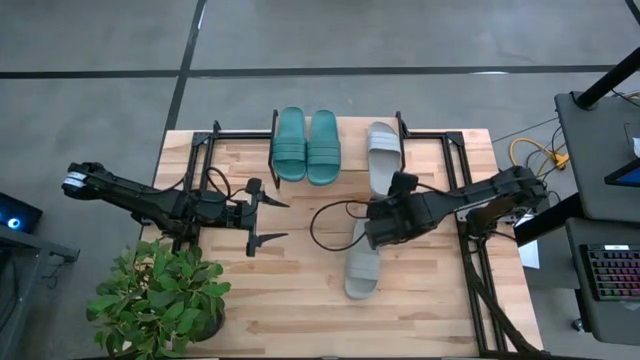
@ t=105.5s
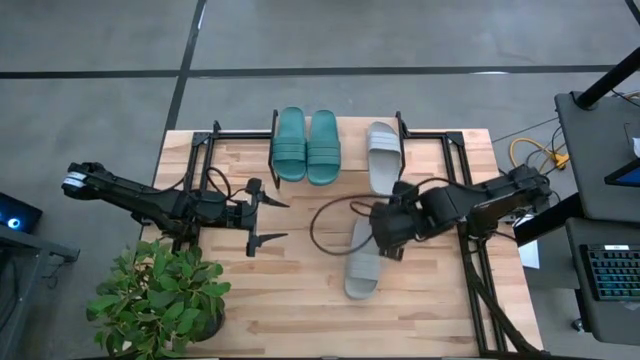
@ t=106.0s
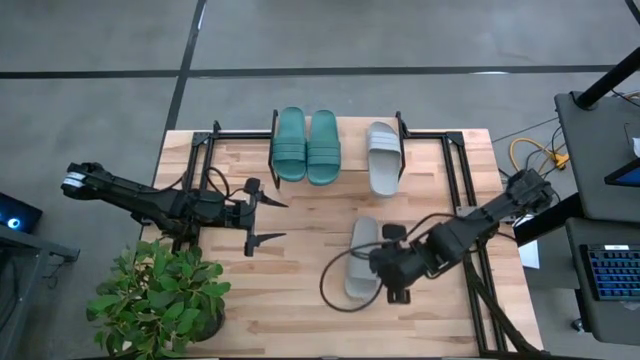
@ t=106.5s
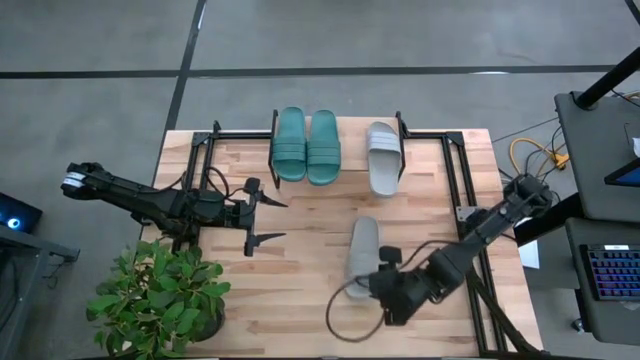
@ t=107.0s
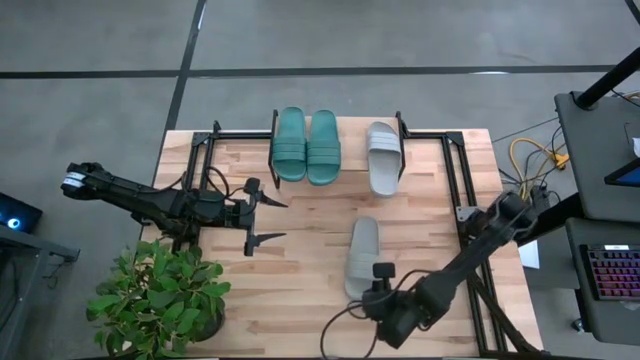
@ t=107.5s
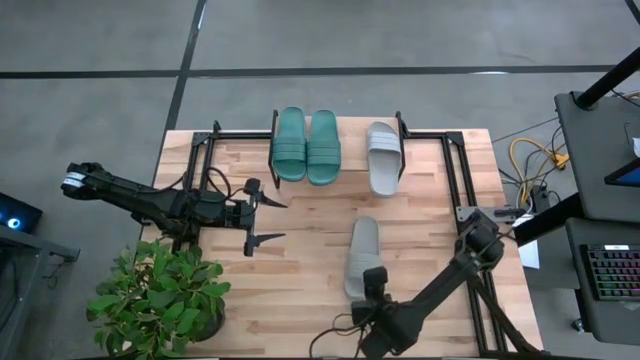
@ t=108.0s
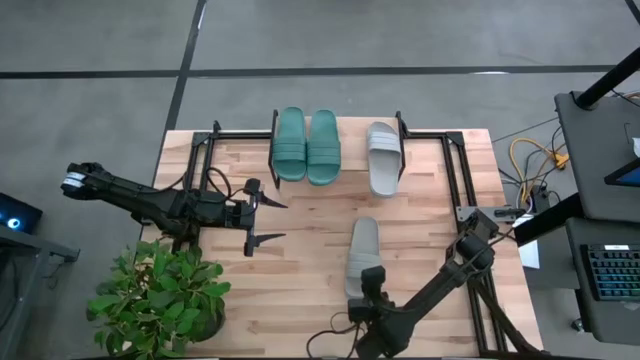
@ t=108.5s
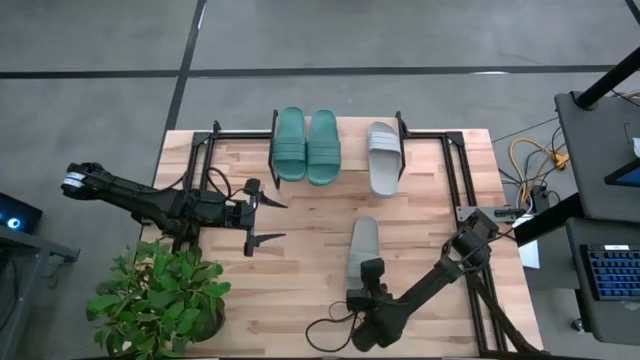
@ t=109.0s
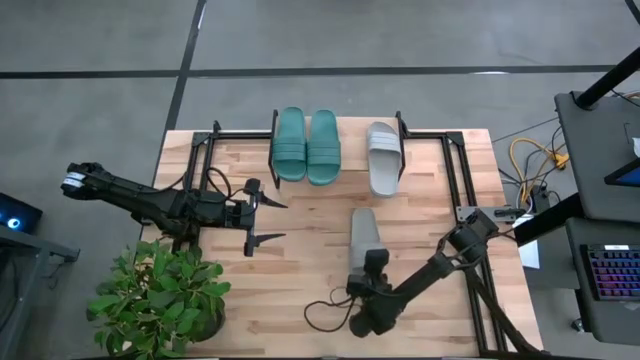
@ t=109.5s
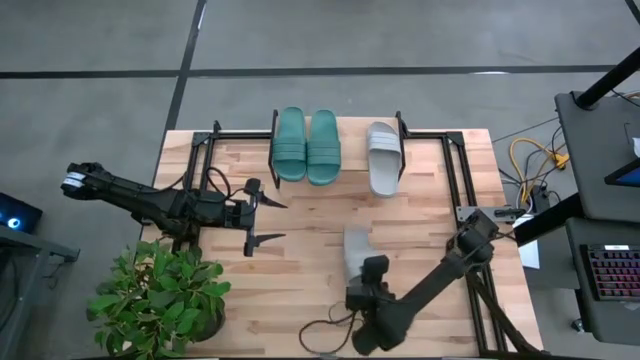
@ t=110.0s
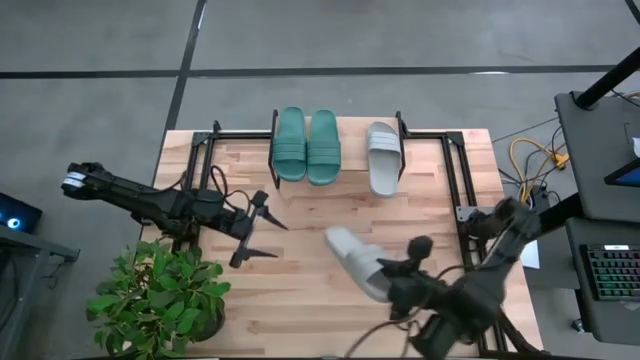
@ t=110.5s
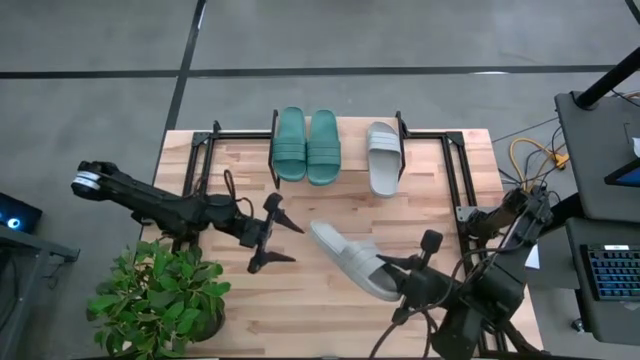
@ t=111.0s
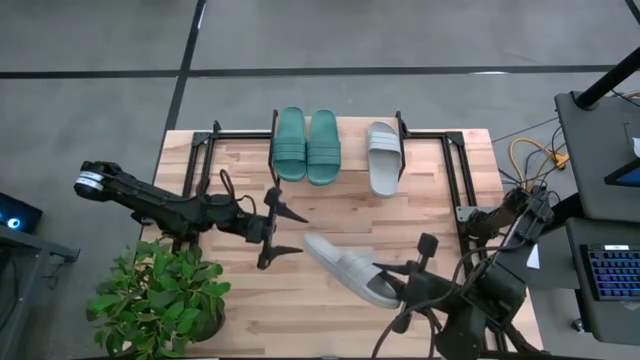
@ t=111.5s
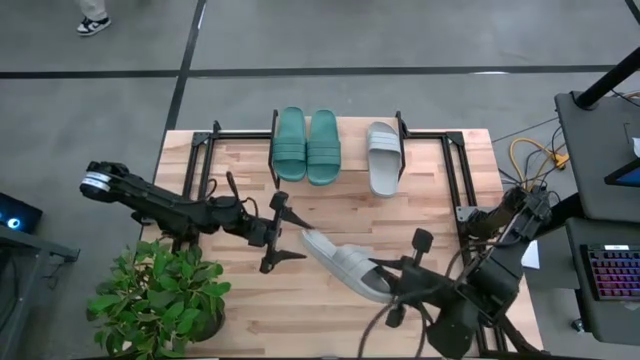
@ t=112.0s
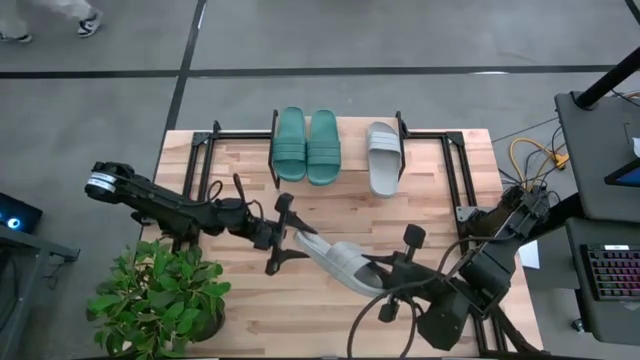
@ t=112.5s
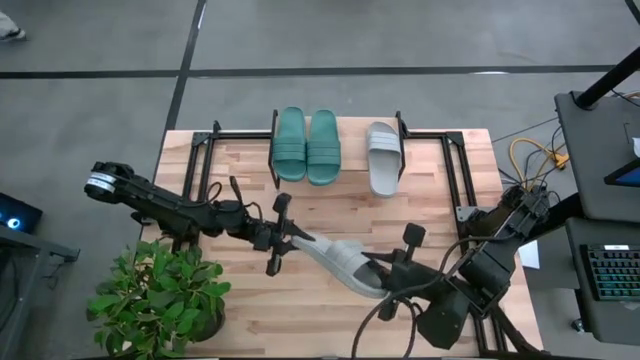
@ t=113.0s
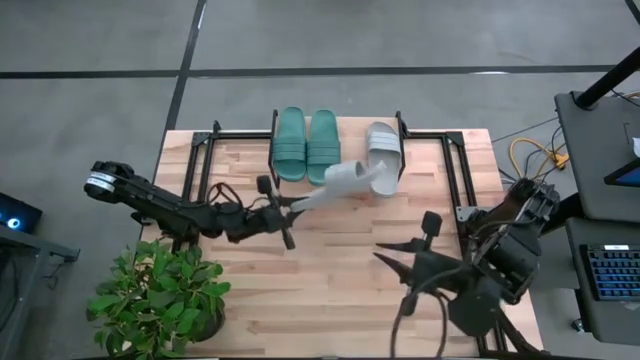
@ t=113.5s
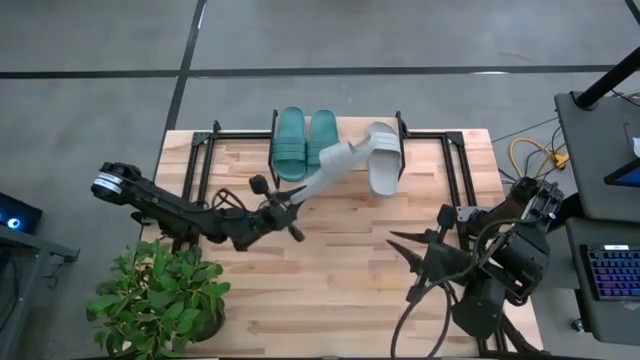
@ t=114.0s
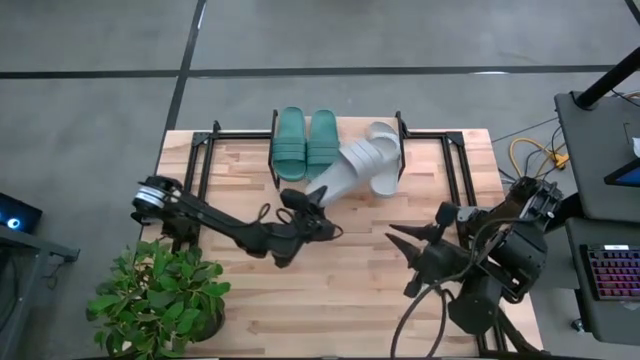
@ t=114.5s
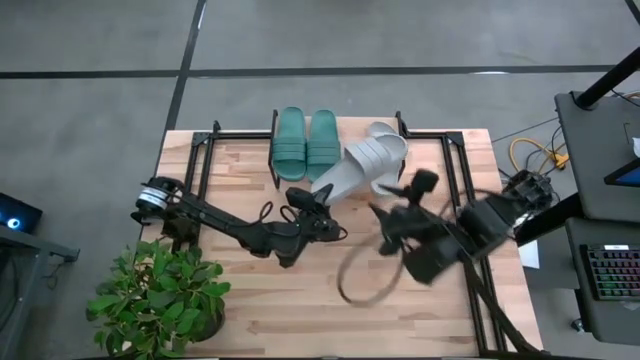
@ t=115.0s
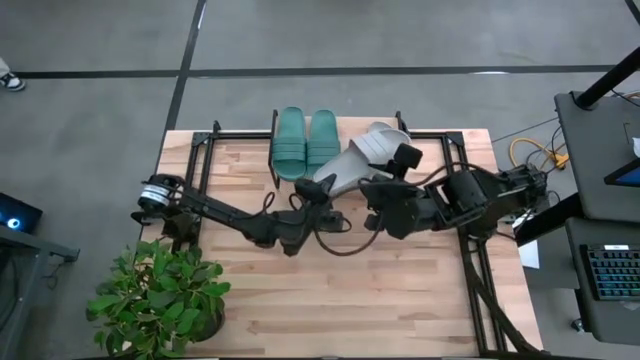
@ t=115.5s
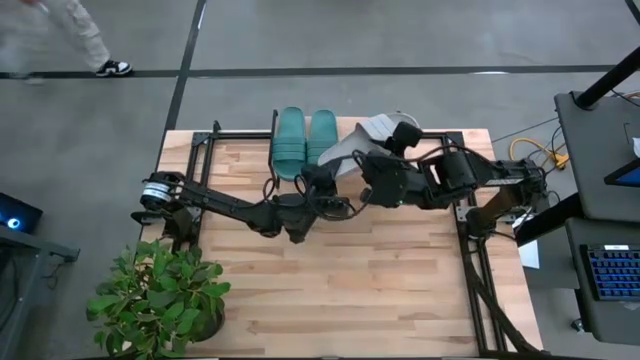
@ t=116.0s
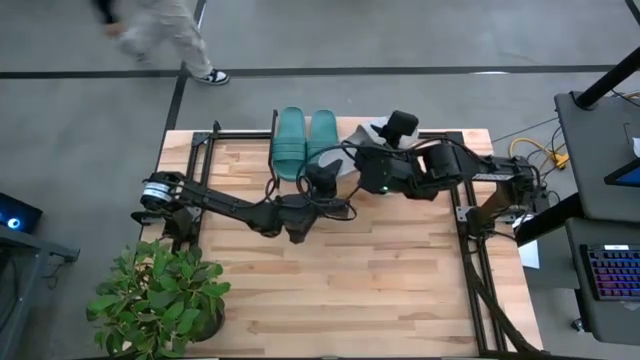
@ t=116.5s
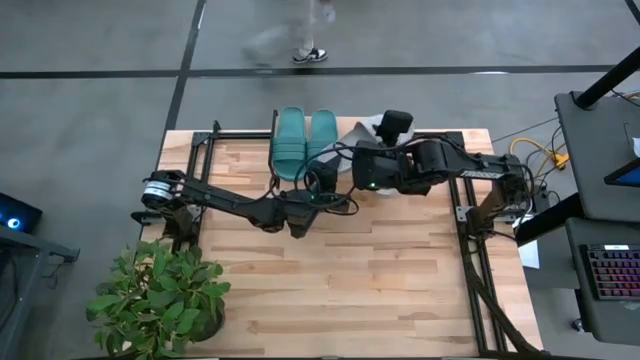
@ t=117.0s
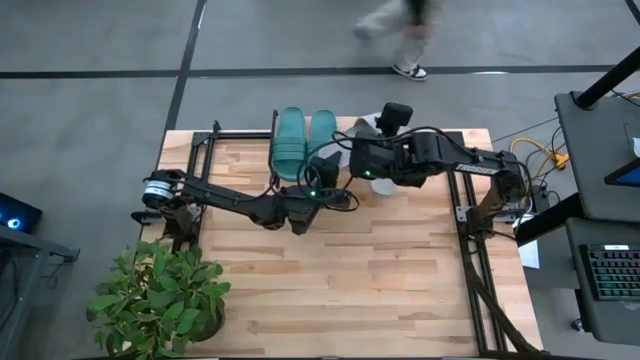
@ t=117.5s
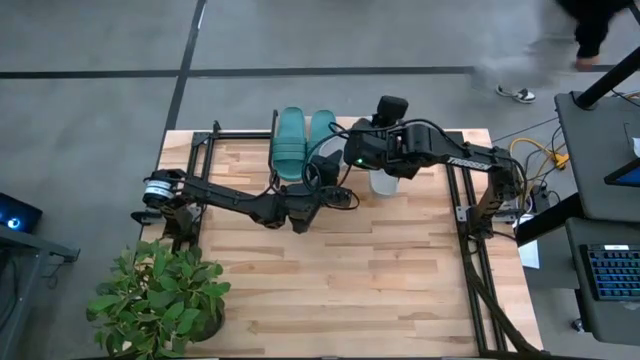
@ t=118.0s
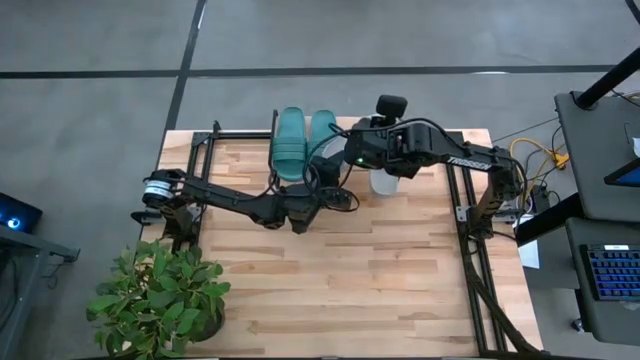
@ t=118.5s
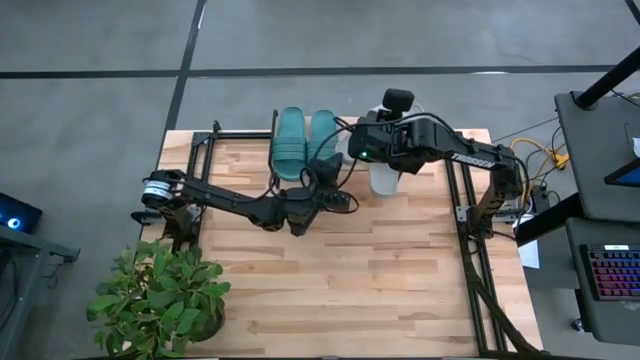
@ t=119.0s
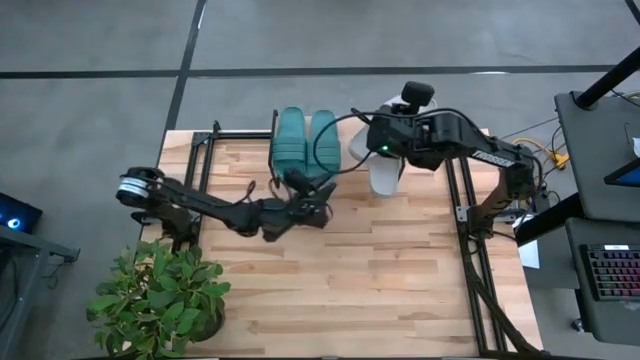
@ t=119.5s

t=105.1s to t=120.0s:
Task: Pick and place slides into the shelf
Put the gray slide on the shelf next to the other gray slide

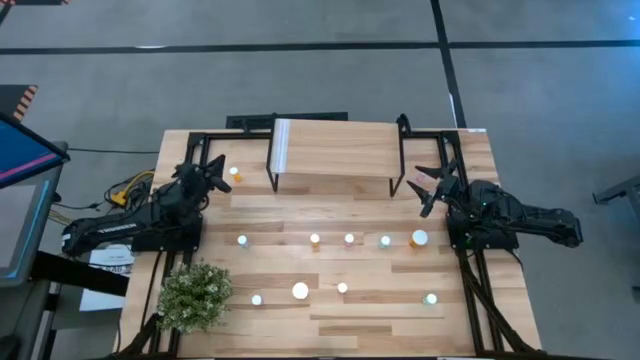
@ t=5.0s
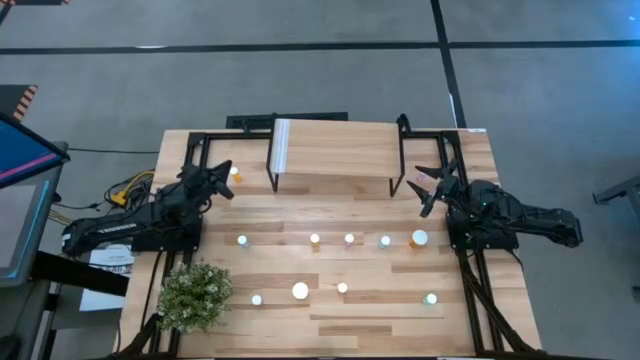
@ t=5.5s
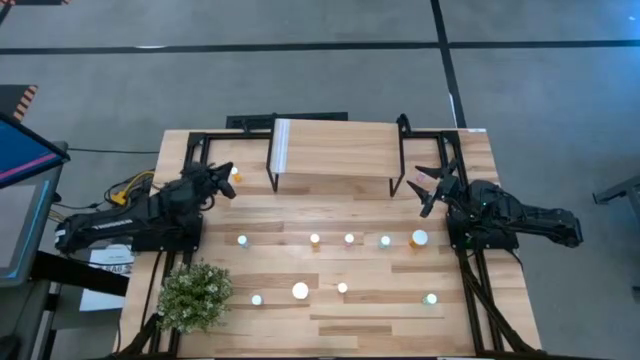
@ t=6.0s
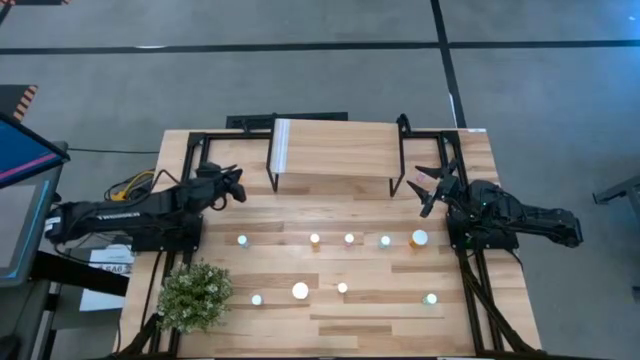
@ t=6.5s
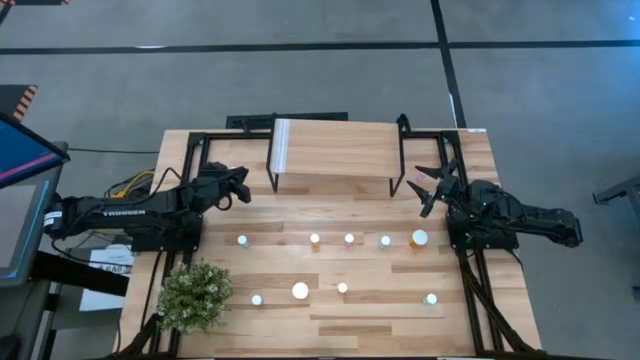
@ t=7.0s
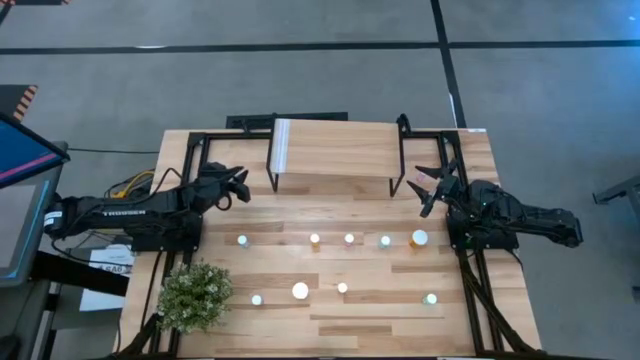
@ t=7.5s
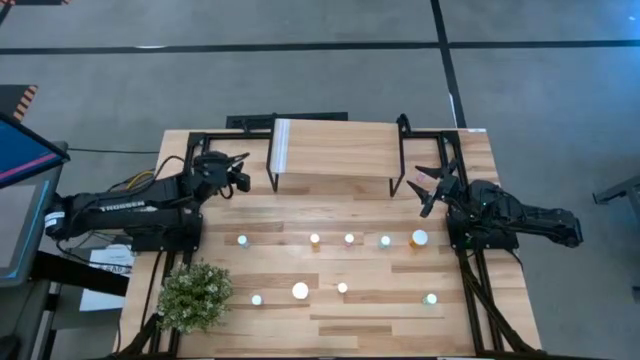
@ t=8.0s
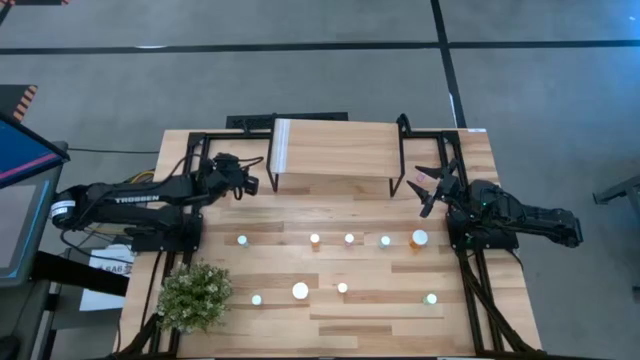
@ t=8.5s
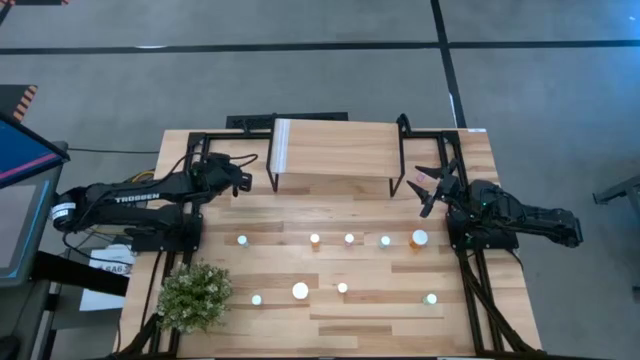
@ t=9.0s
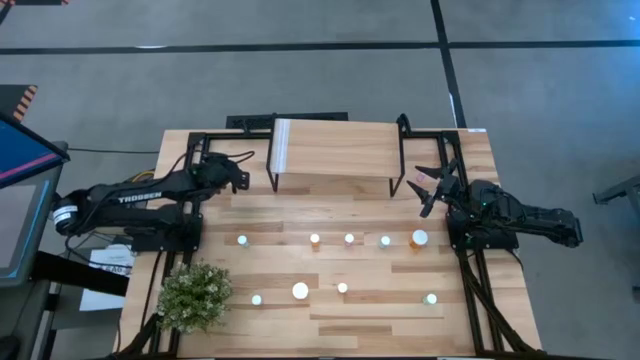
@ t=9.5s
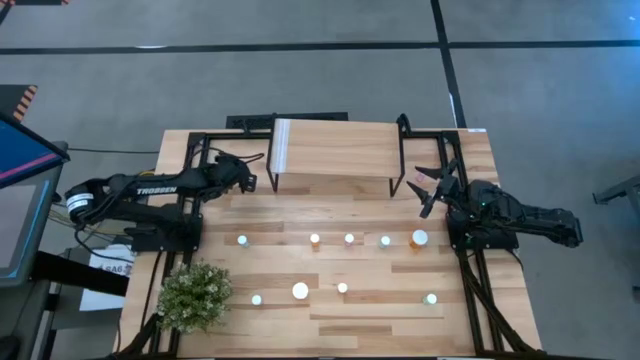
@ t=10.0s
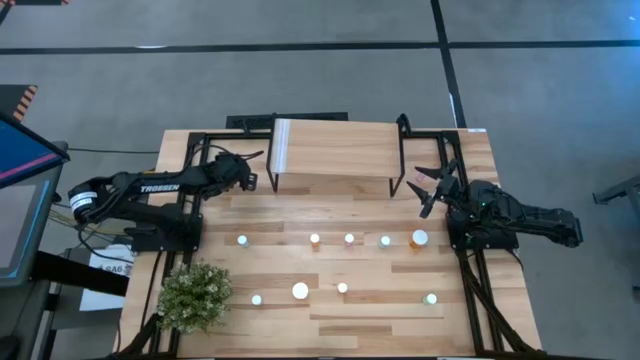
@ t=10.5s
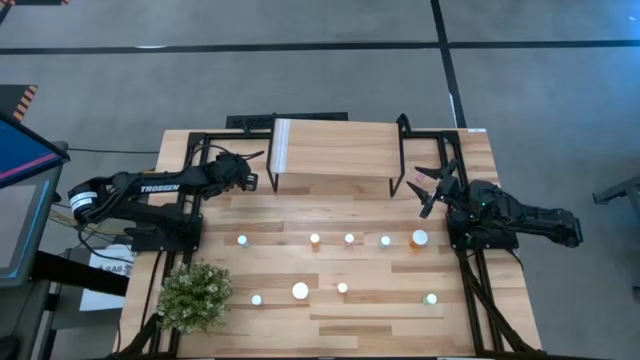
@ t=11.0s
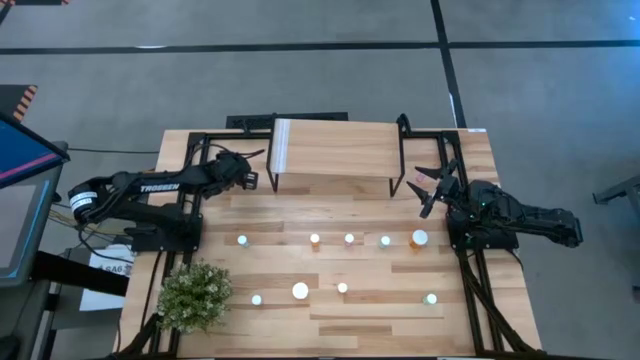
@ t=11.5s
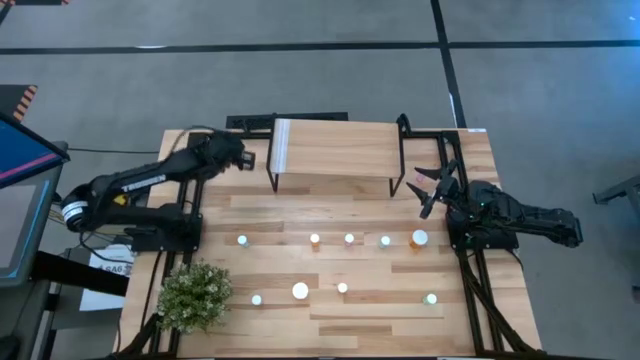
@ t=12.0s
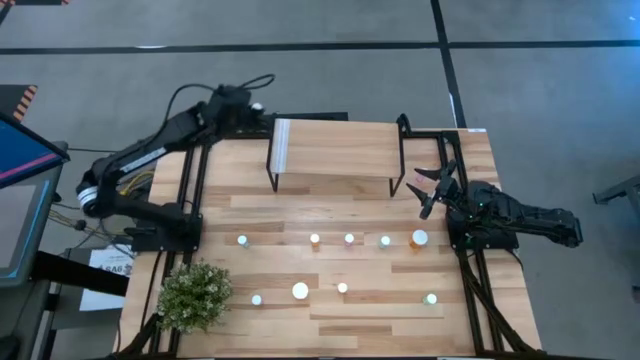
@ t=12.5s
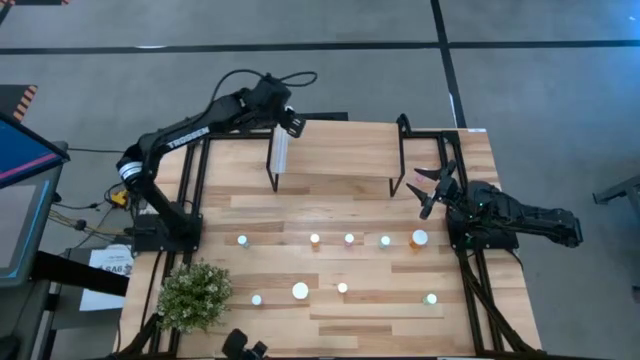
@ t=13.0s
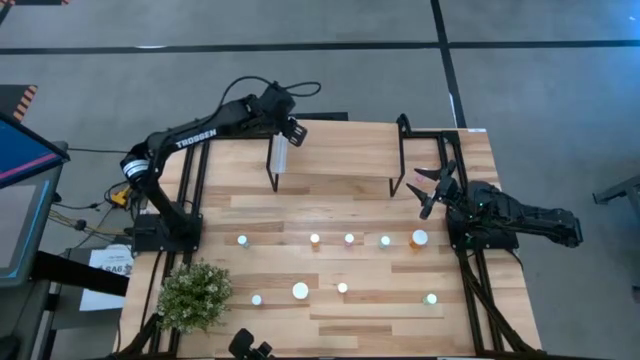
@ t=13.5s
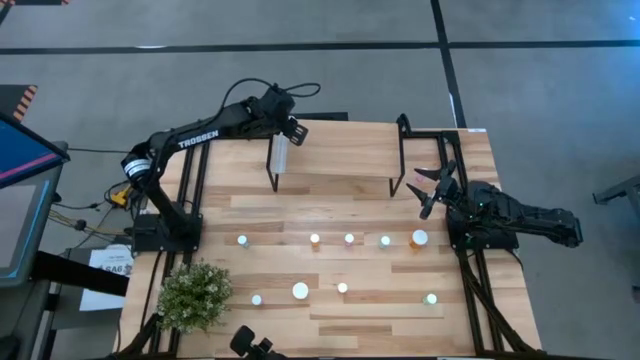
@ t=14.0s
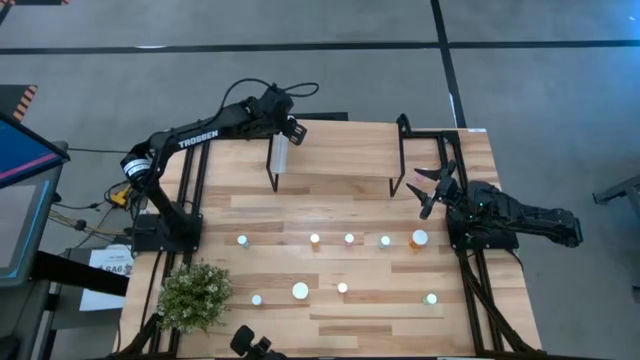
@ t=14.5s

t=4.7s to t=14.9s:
Task: Pick and place medicine bottles onto shelf by color
Put the top small orange pill bottle on the shelf
